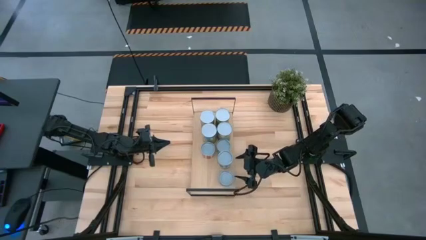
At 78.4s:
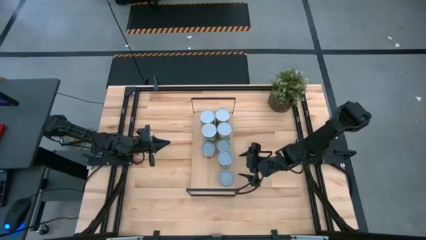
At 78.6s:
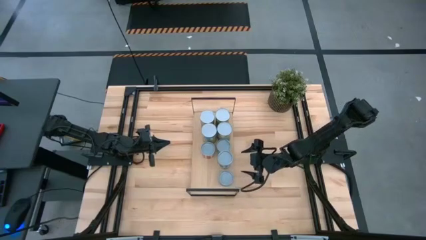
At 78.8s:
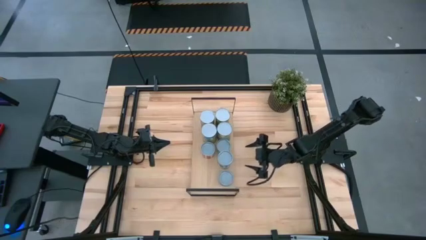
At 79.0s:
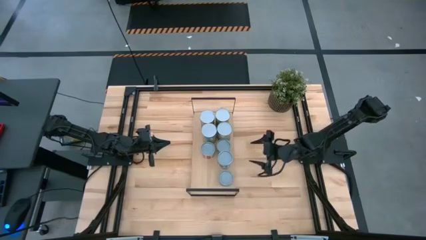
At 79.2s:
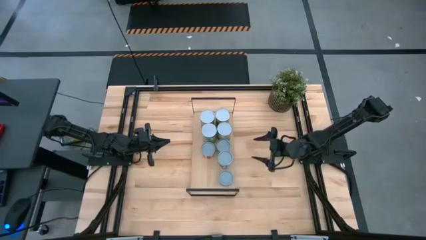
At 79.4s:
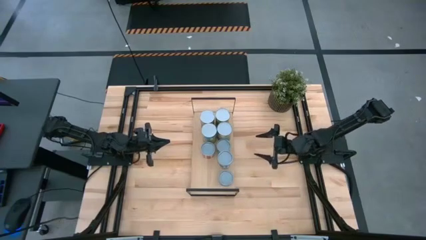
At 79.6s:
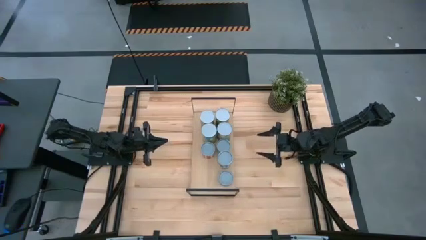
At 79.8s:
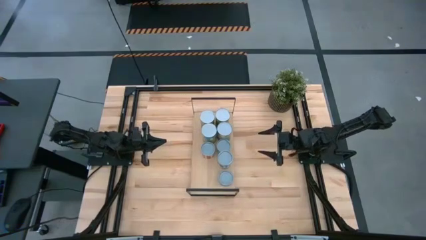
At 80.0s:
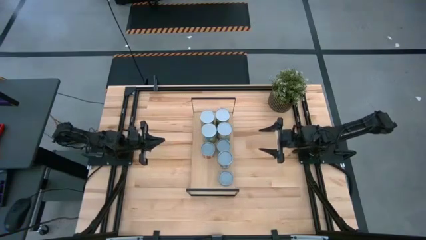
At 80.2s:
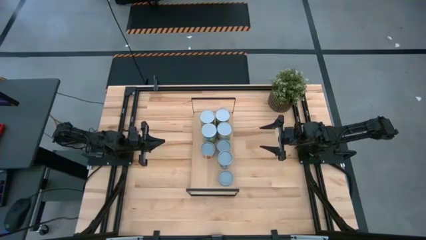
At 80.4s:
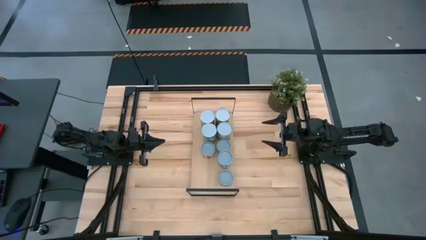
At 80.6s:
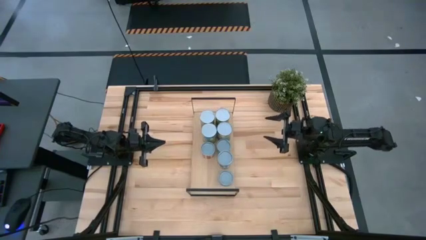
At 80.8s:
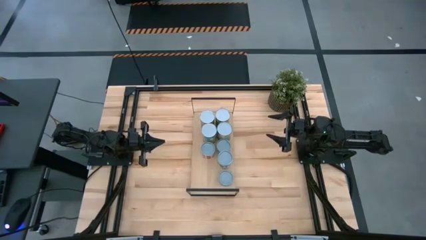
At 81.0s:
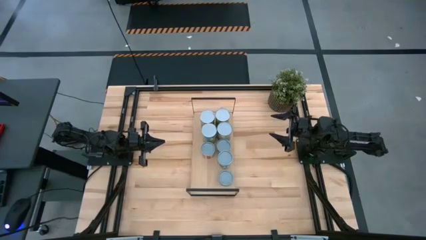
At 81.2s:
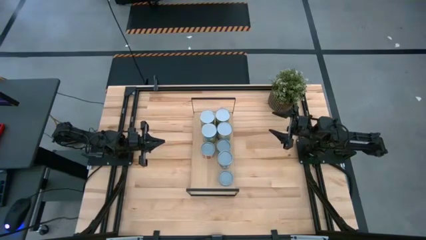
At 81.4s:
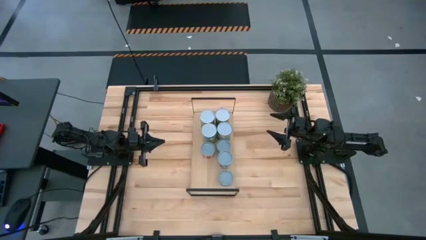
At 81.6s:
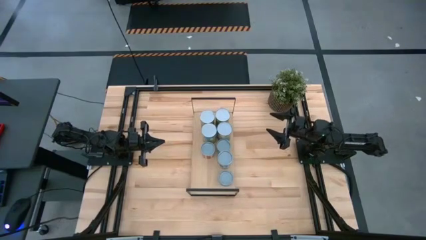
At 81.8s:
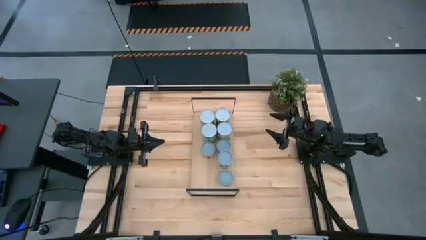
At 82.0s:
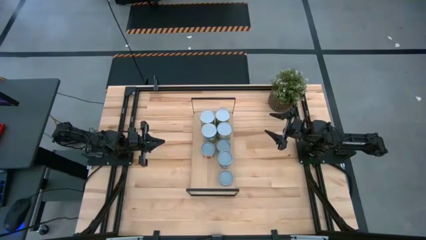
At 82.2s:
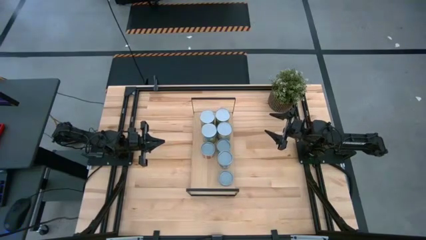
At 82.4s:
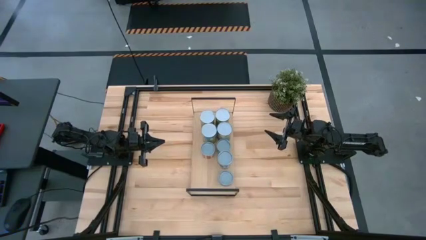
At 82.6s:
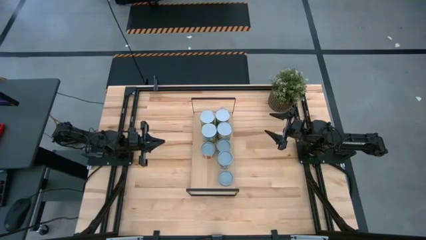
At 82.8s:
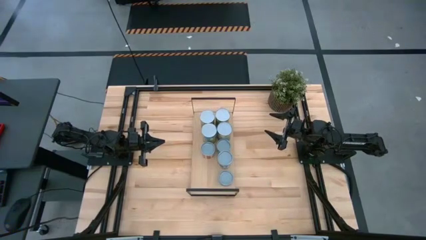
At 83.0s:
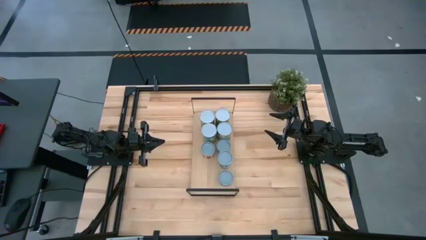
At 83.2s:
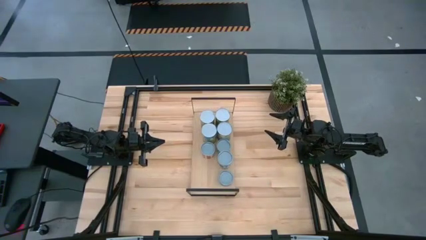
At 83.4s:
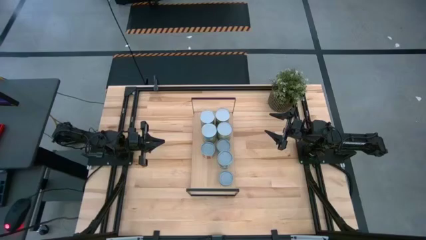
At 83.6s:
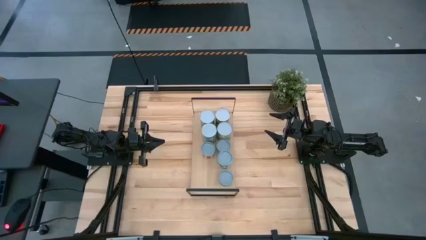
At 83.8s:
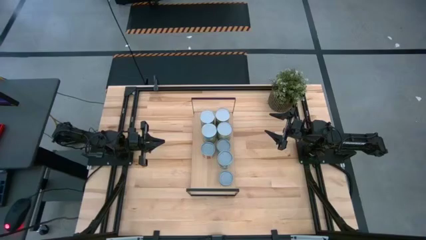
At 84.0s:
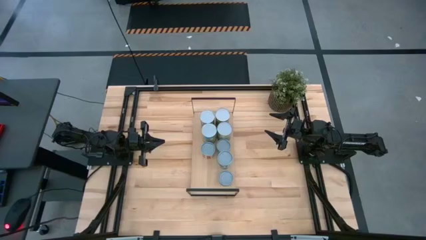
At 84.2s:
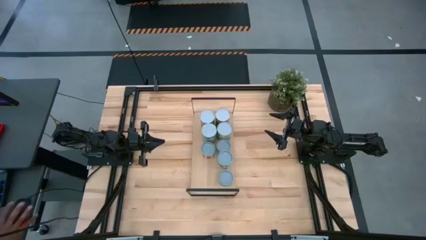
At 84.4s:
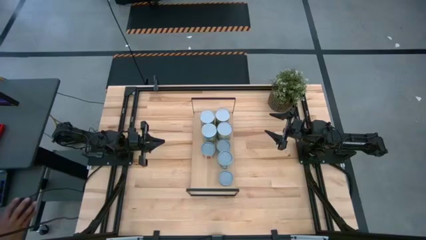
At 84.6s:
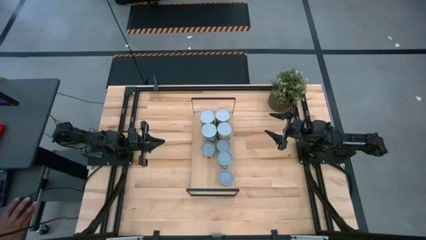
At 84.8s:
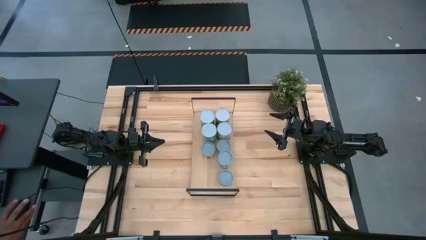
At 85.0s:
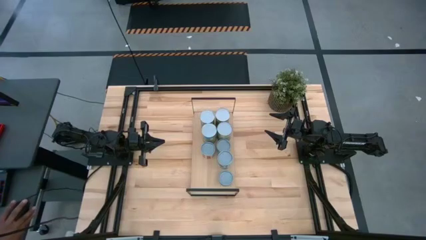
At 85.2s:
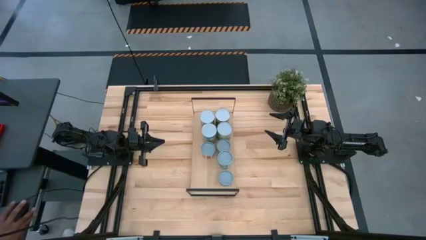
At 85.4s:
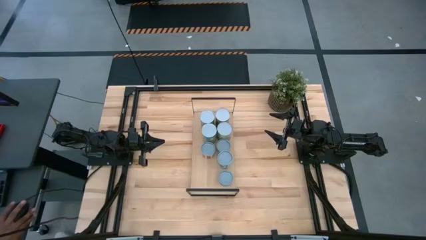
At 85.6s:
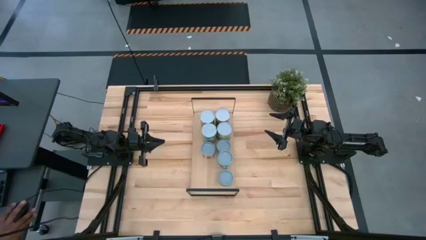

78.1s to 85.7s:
Task: Pick and place cans onto a shelf
Return to Home Position

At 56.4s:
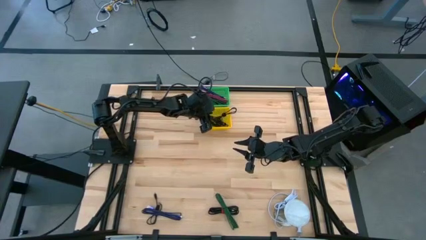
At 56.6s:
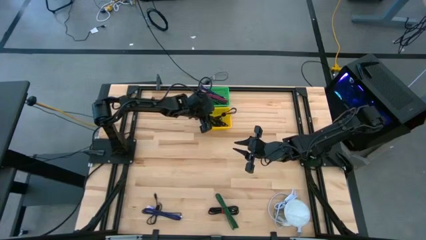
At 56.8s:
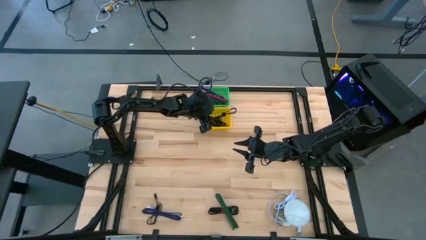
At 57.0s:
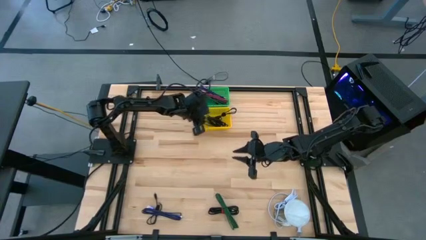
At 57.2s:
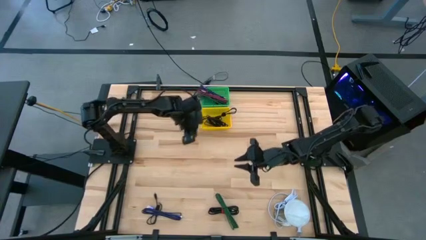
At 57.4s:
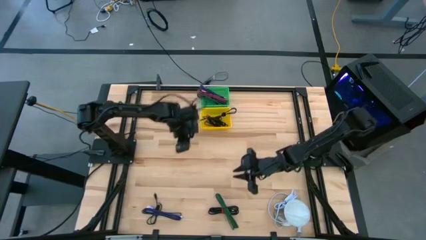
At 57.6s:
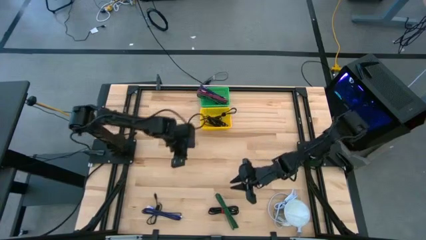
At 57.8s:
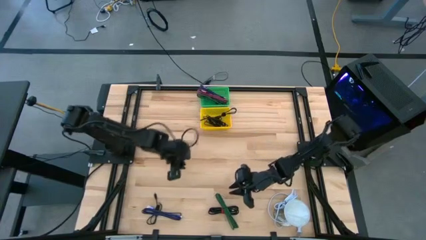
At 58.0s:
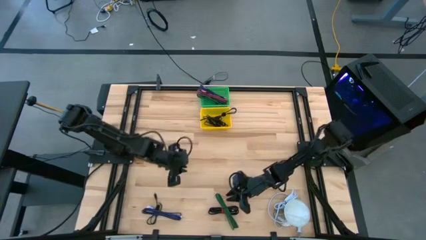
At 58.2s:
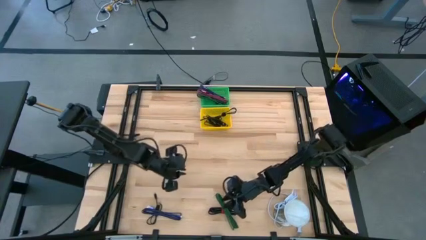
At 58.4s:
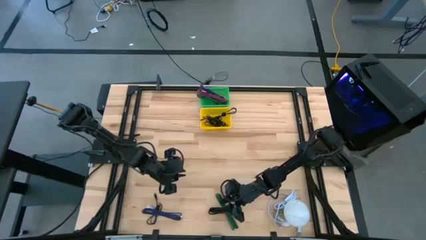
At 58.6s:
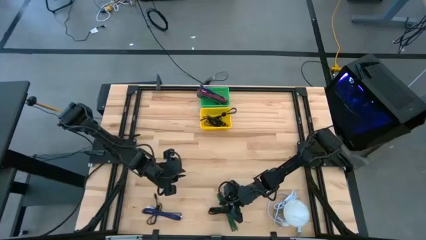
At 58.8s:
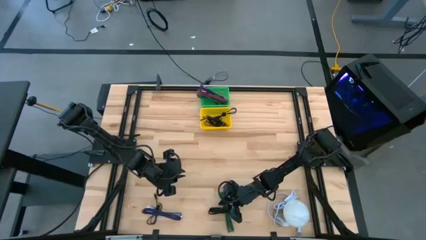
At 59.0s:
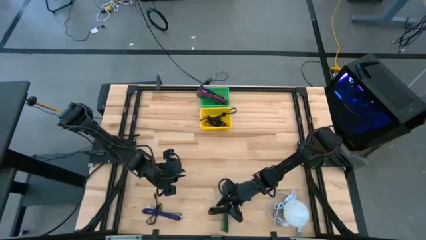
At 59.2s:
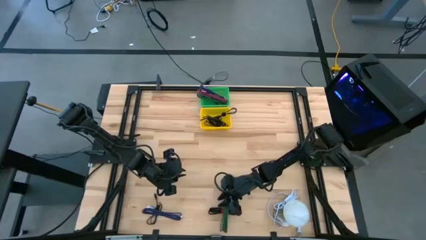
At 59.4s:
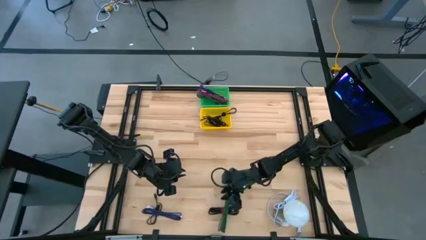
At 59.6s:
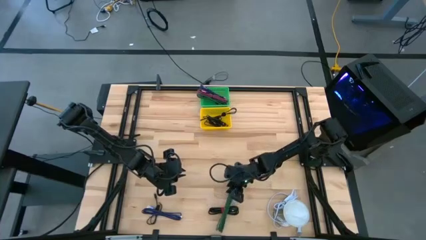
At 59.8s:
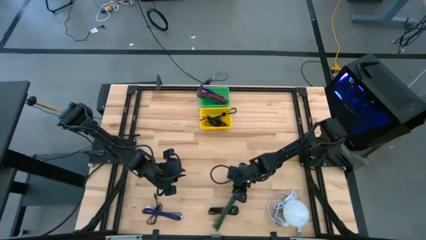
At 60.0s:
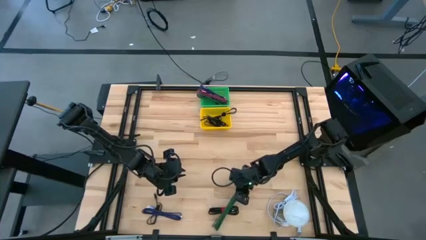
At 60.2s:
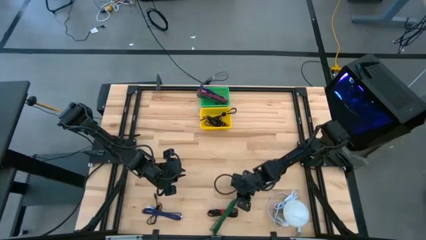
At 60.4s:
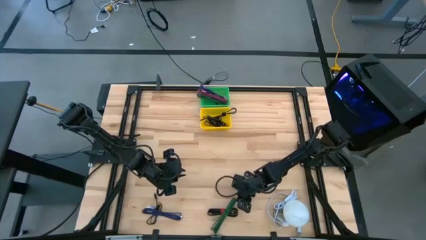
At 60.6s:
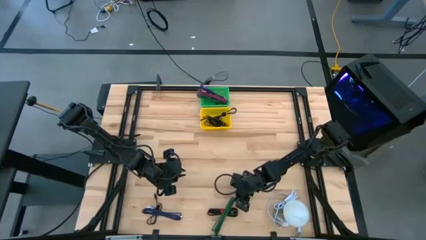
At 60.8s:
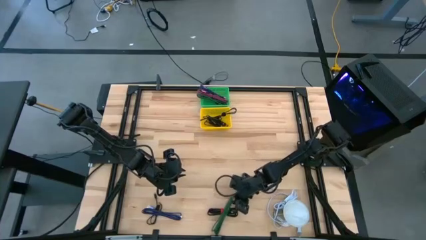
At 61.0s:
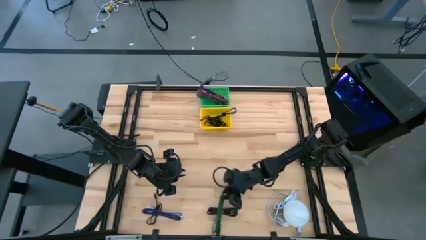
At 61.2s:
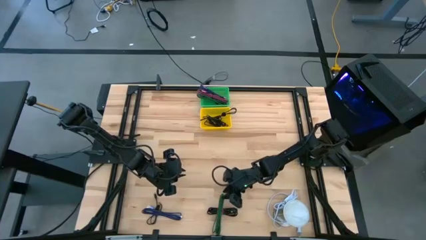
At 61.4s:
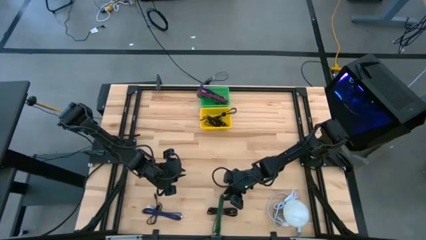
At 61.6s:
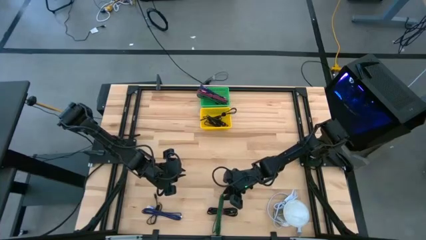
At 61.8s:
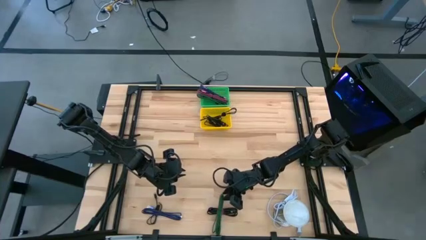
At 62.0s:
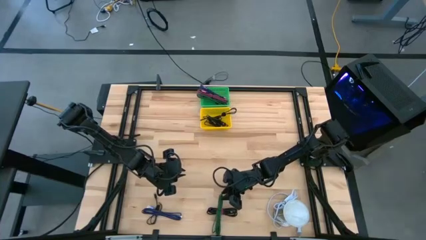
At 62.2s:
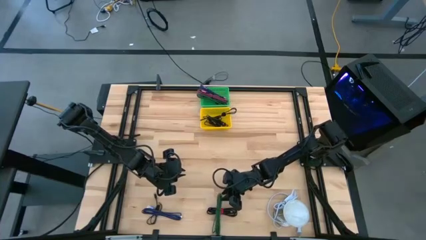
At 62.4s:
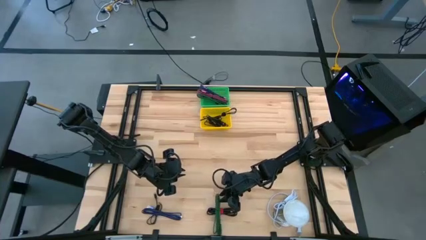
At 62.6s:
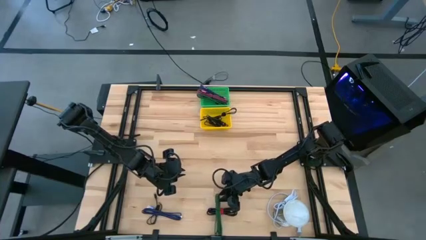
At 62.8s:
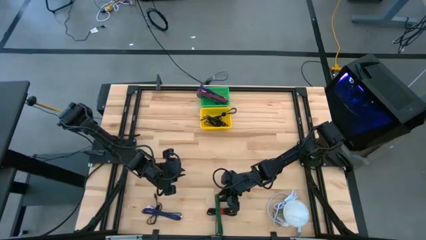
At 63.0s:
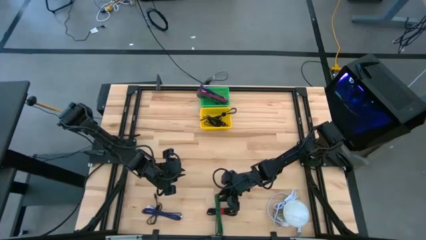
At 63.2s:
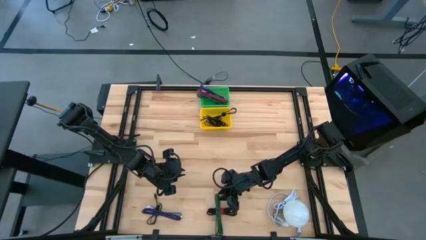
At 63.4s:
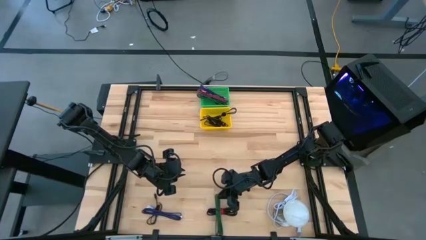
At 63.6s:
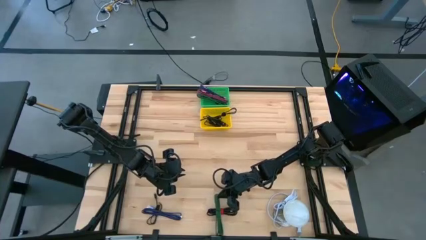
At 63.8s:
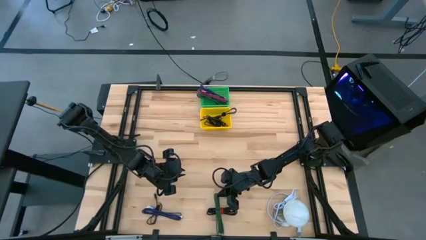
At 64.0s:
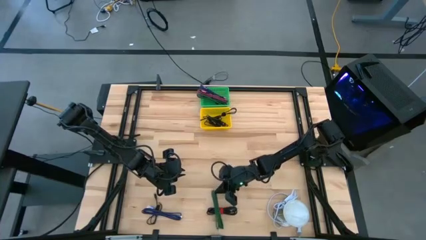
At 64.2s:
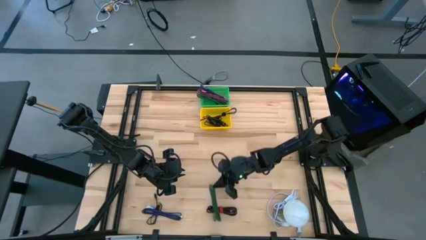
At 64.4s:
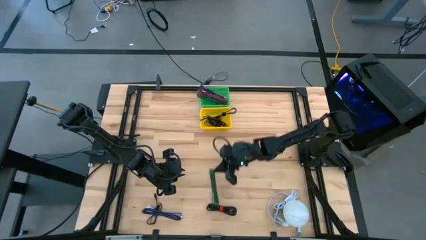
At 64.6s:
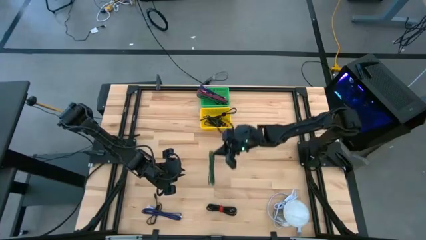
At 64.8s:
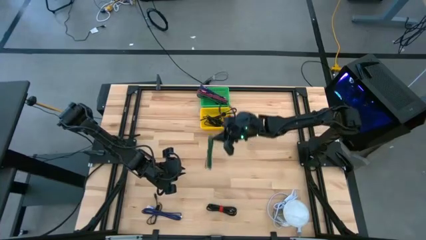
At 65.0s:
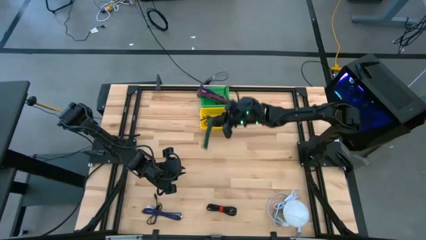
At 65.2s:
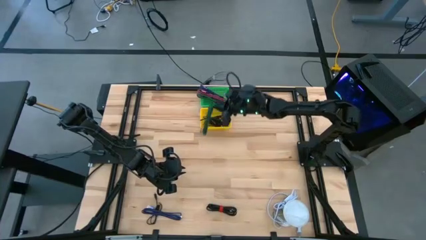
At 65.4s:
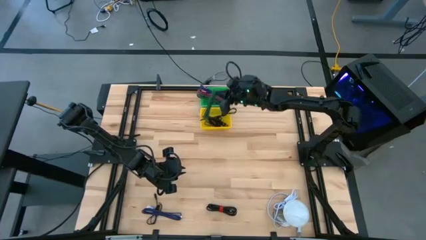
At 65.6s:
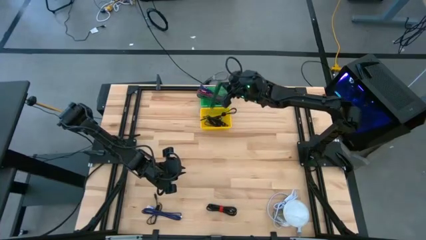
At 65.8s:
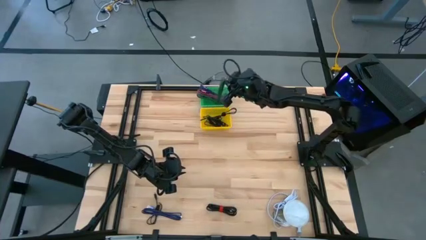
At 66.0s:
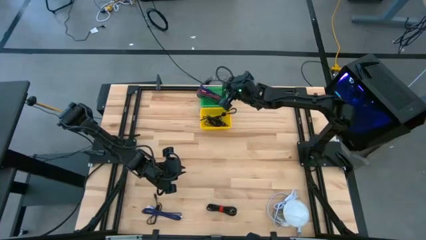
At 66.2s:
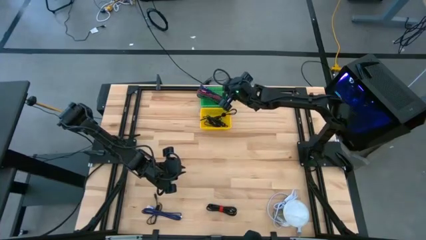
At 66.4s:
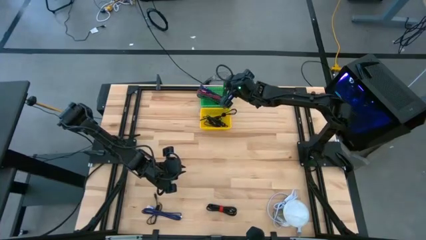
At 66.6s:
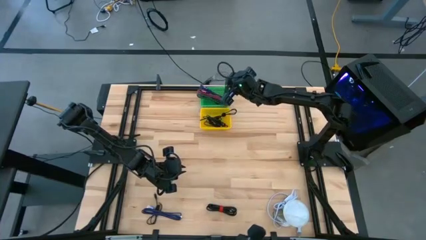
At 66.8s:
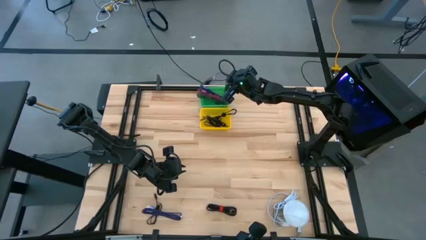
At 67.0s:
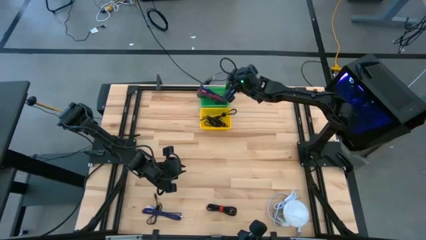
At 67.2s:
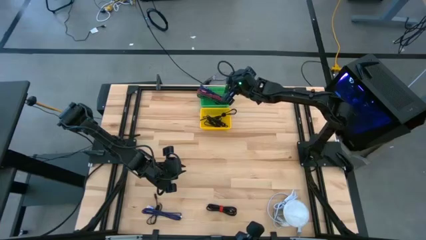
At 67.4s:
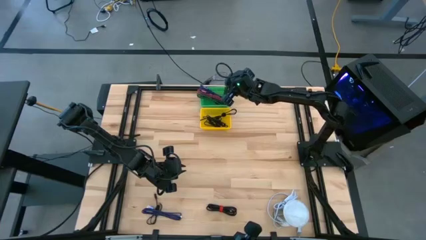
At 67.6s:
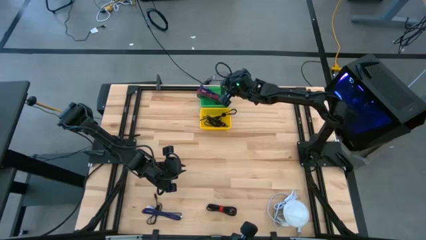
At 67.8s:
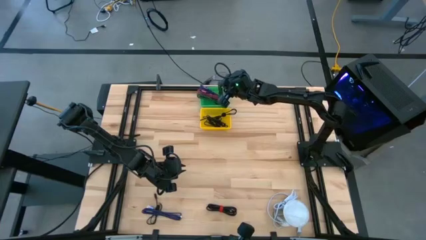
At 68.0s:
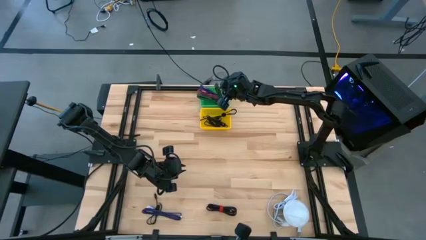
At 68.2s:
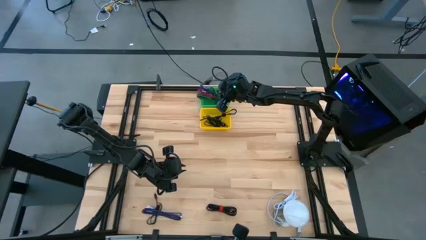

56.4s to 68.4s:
Task: Pick & Place USB Port
Put the green patterned charger cable into the green basket
